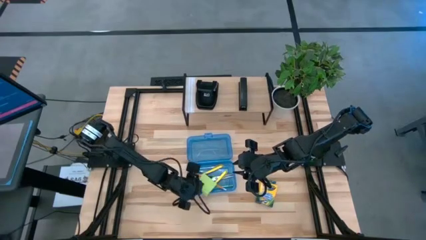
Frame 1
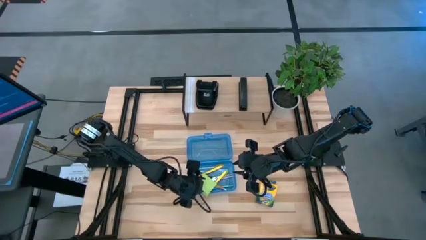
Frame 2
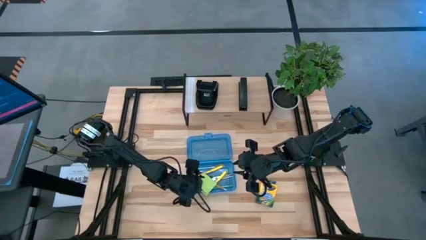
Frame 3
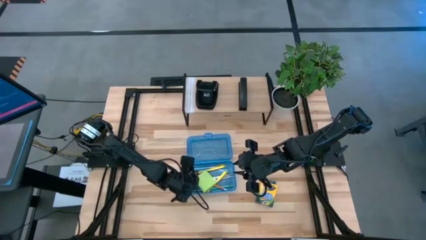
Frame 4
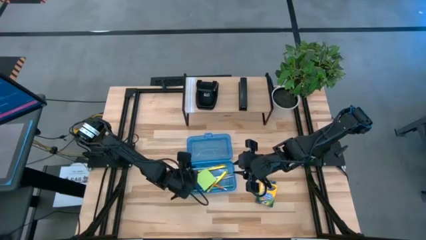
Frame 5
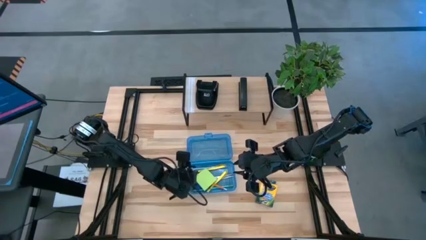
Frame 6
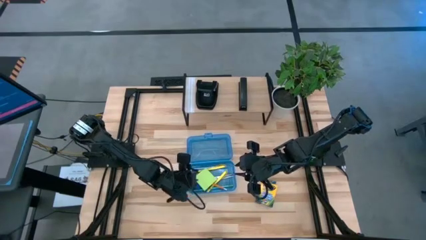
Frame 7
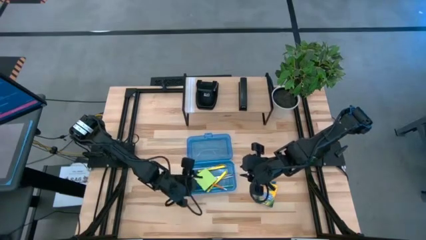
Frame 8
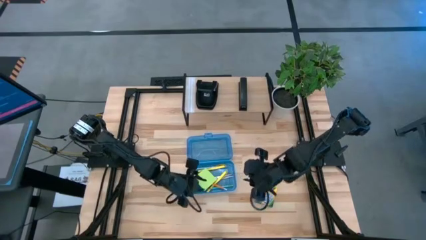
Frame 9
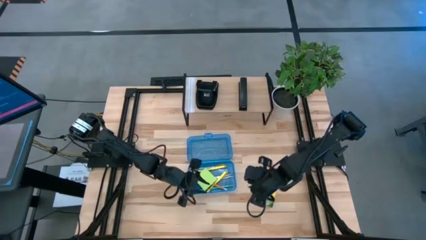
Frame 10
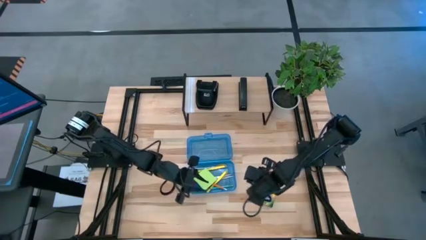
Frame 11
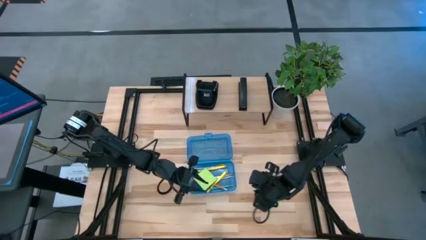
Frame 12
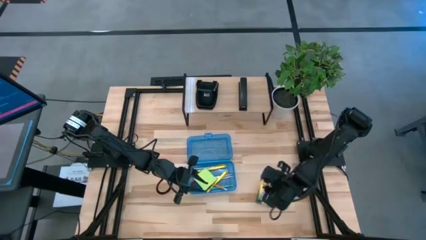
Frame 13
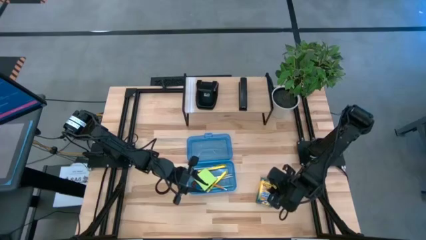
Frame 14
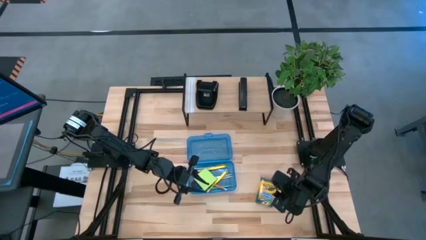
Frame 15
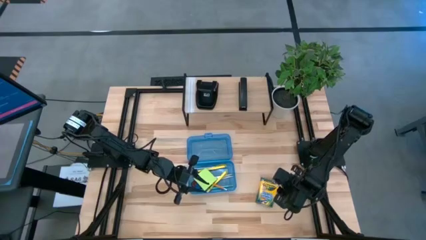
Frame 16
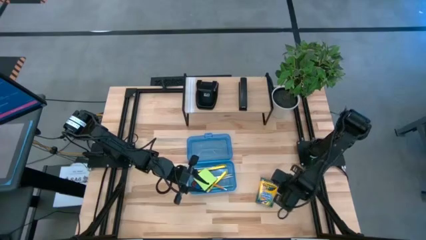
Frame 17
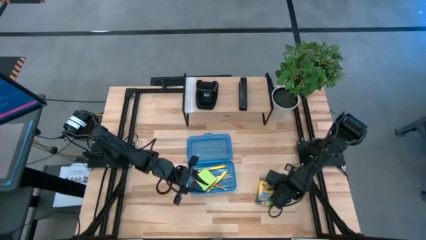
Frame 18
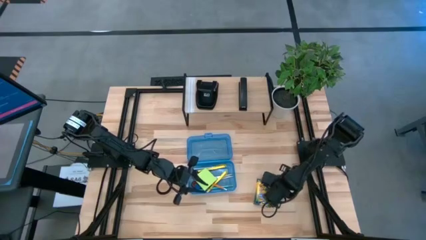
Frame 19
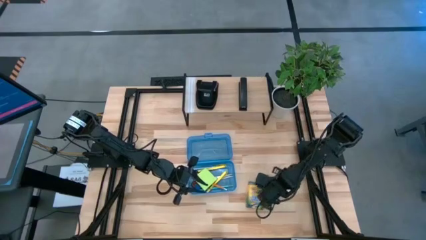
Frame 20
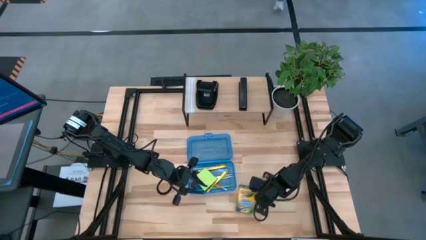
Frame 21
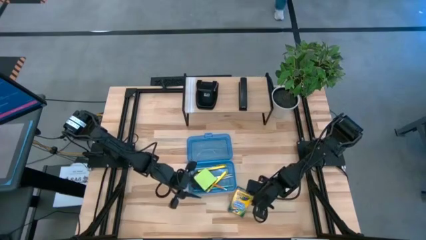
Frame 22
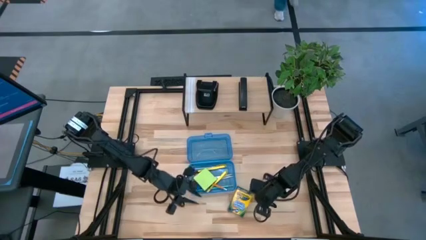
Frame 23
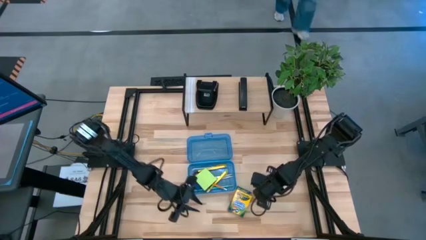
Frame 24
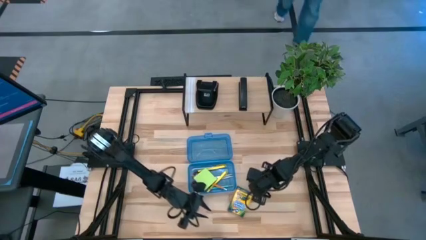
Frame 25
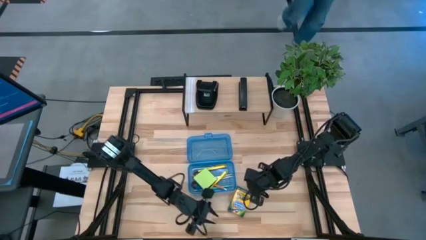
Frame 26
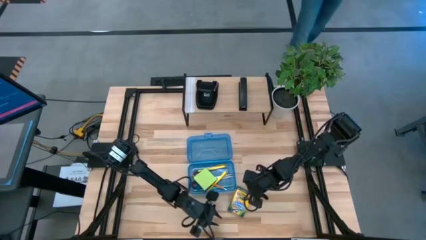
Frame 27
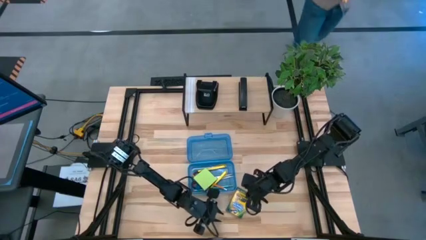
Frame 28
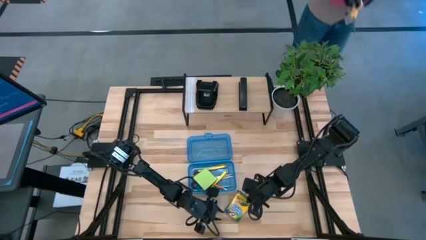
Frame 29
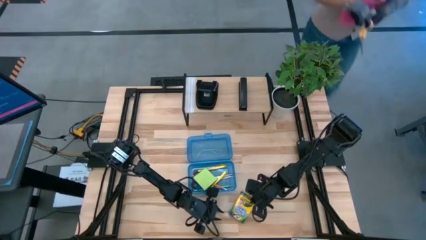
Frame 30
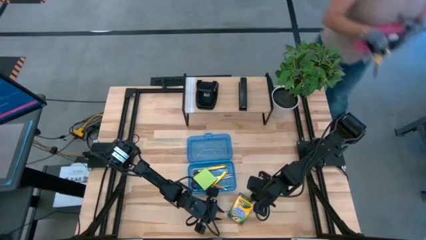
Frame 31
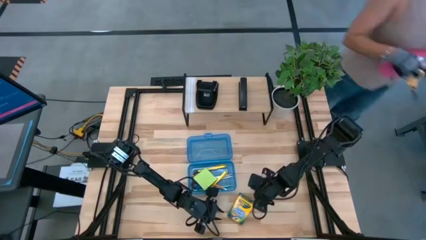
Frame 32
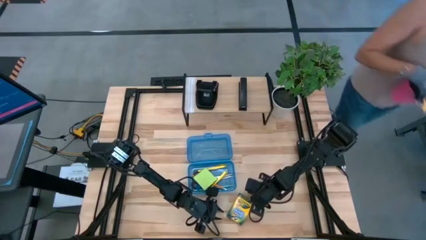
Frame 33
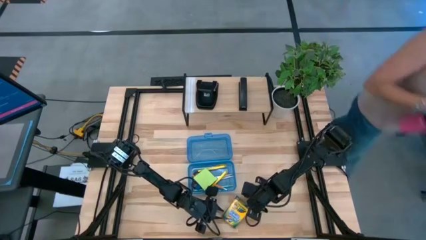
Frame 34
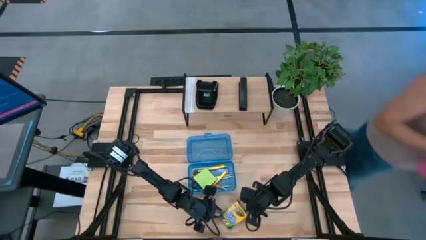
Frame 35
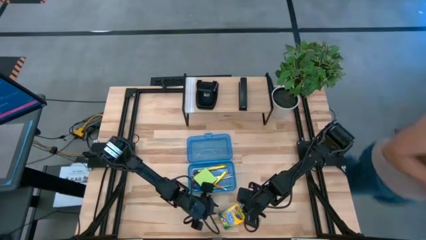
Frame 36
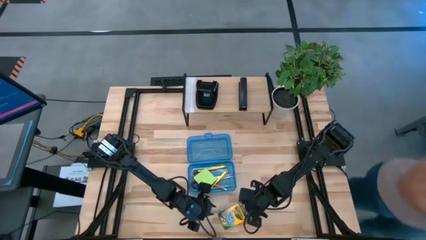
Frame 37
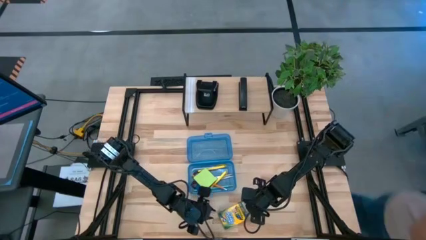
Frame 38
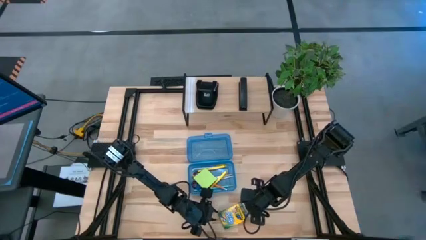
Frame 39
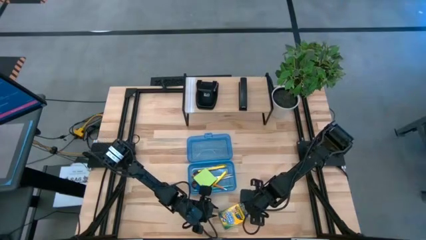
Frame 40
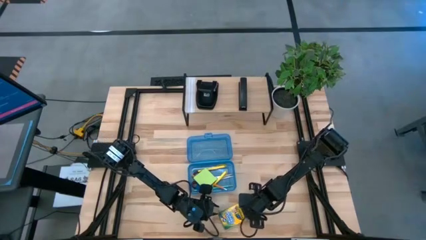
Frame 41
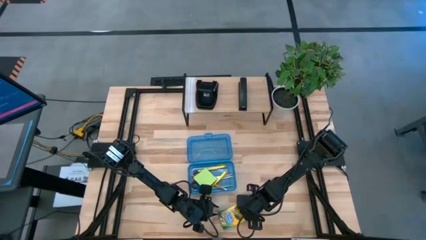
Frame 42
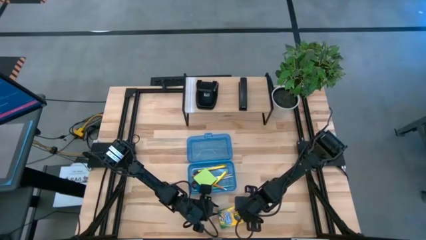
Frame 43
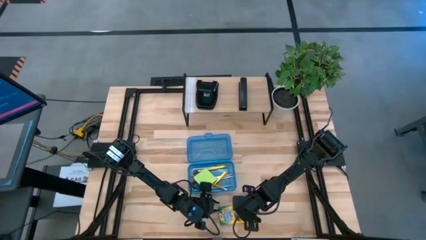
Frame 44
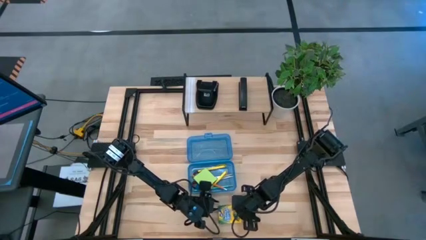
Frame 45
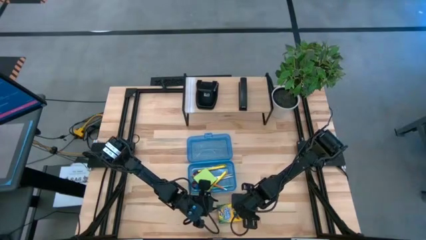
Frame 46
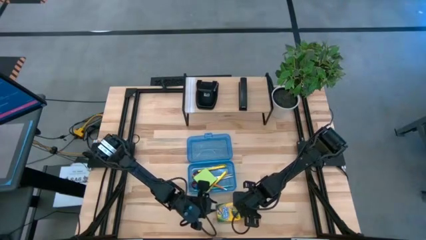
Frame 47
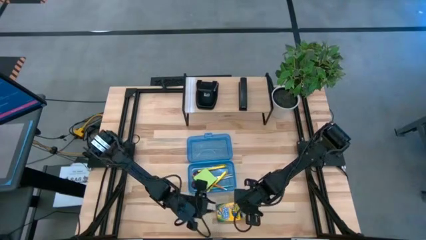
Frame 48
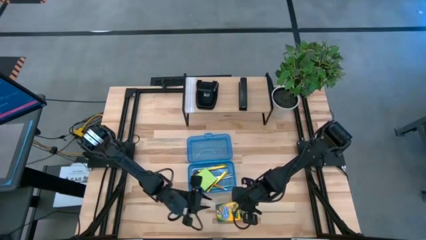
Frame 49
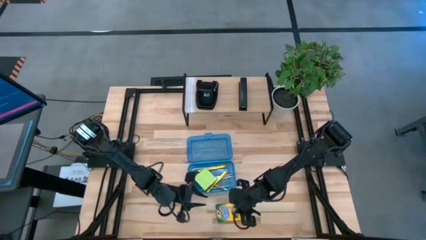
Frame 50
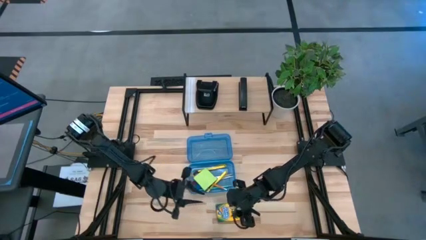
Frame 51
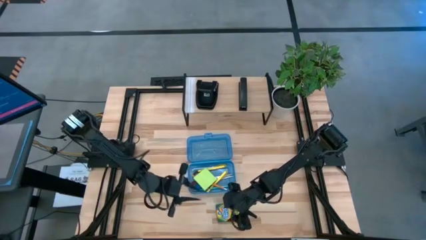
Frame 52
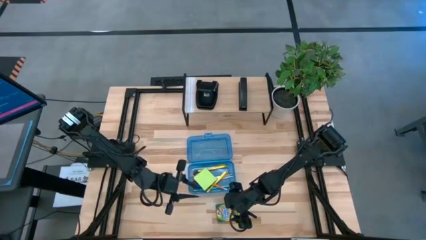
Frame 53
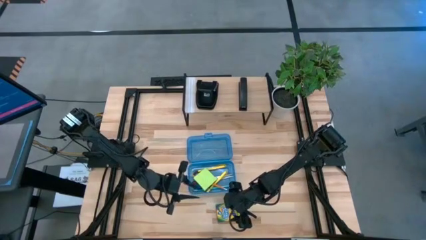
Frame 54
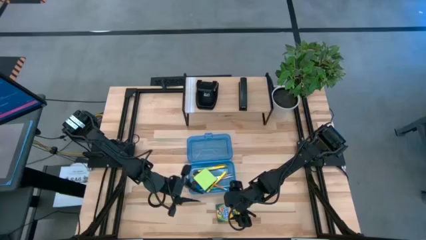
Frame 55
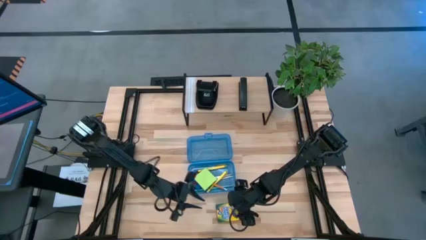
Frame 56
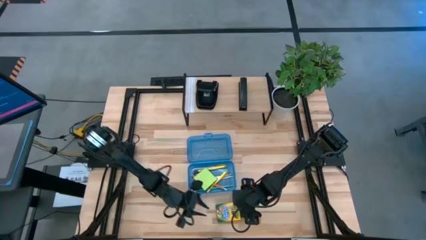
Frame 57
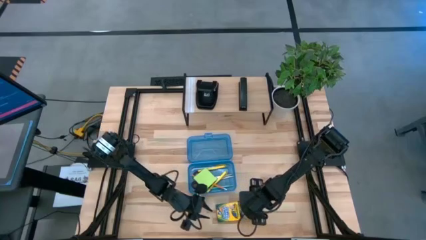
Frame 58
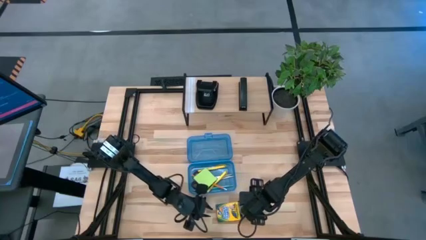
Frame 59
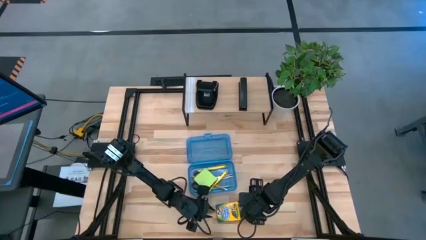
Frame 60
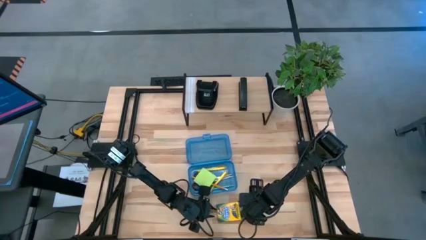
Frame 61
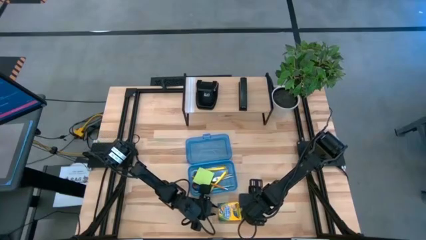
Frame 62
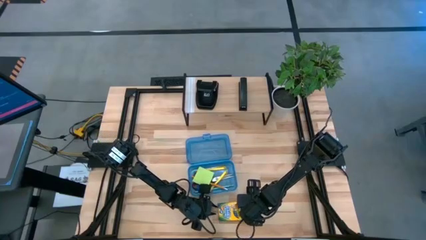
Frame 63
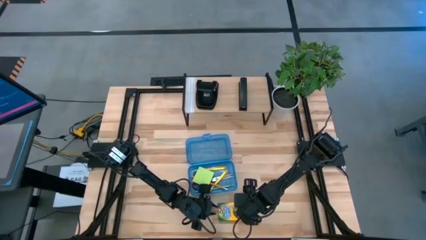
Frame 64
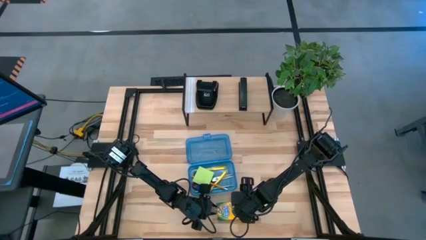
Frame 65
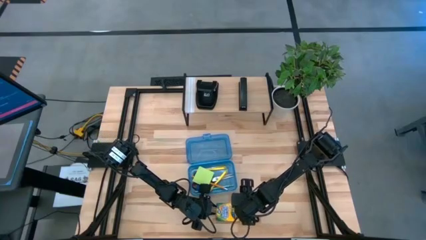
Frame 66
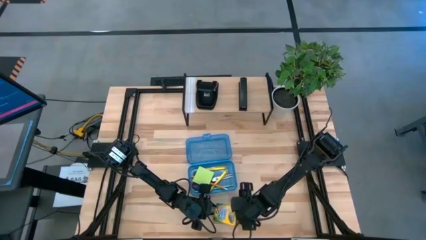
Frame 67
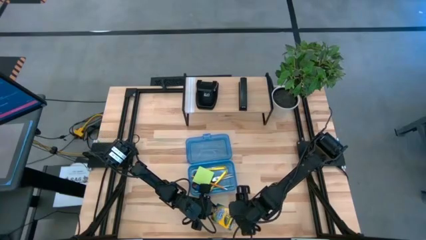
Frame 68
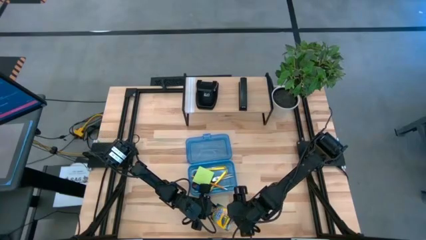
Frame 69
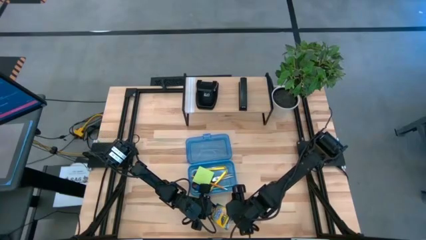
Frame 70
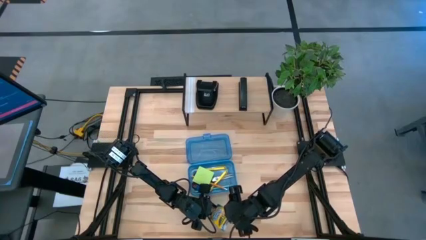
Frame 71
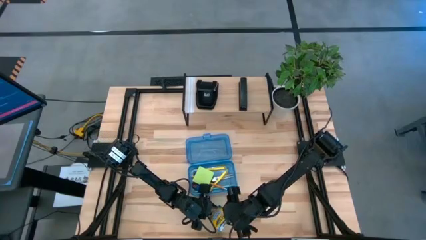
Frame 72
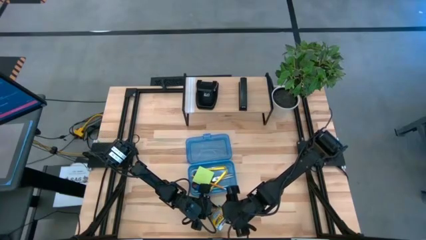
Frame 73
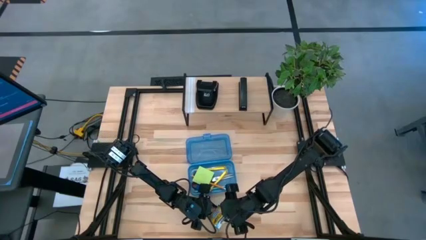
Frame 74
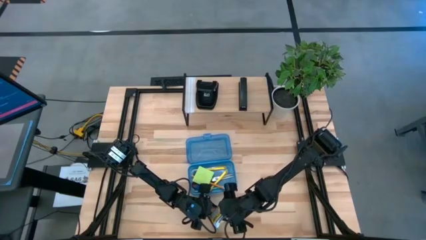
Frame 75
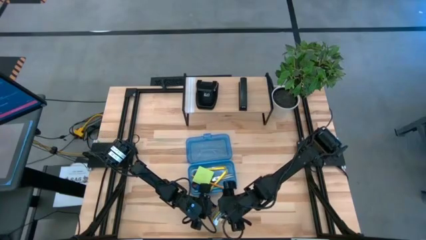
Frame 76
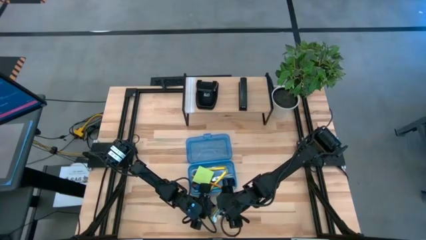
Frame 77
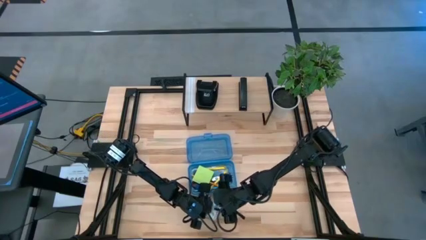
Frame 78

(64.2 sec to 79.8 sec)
Task: Pack school essentials
Put the crayon box into the supply box

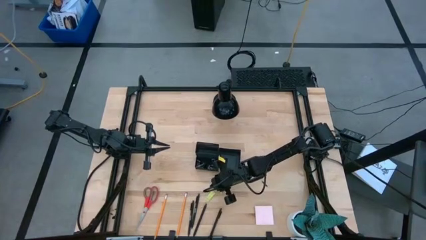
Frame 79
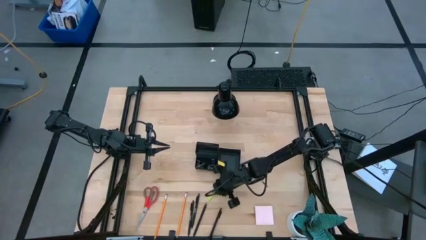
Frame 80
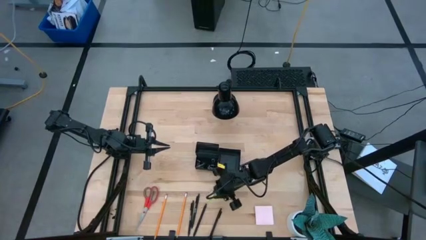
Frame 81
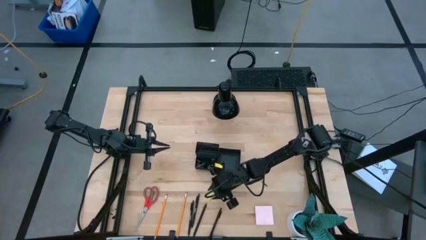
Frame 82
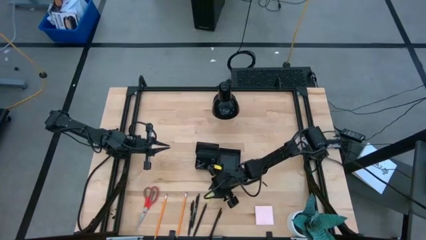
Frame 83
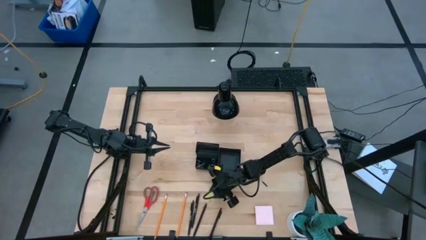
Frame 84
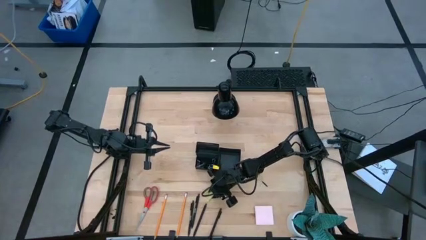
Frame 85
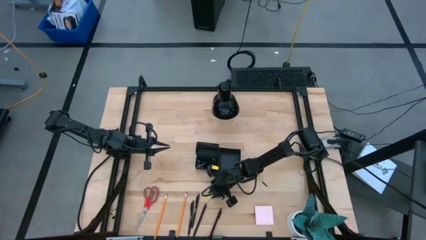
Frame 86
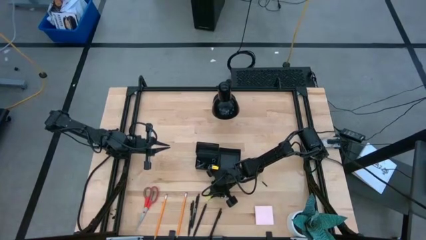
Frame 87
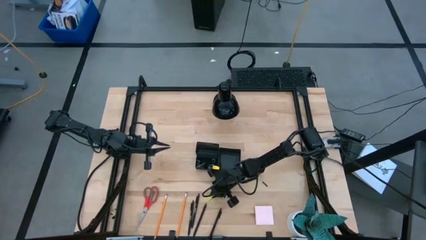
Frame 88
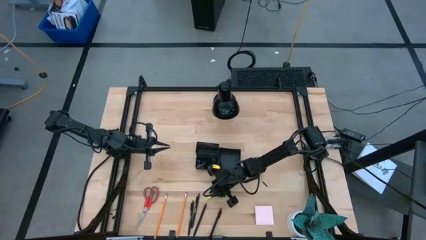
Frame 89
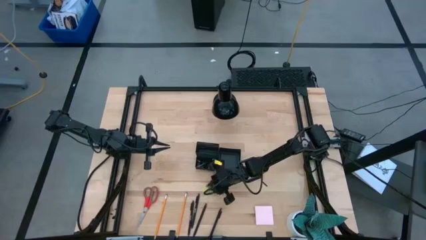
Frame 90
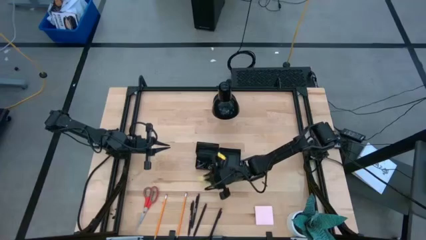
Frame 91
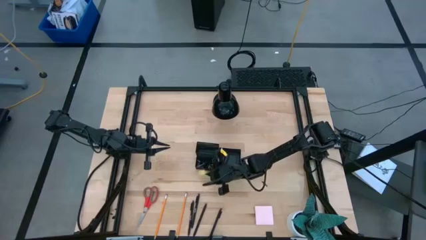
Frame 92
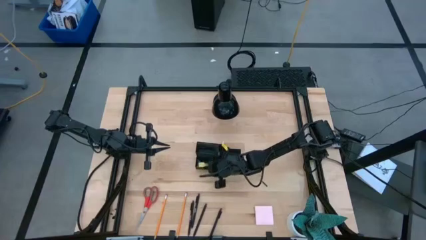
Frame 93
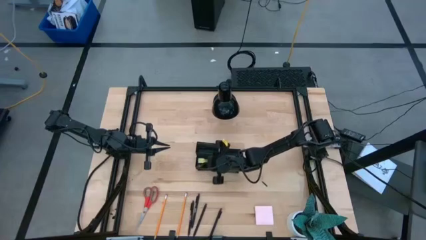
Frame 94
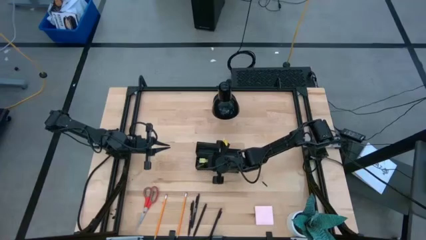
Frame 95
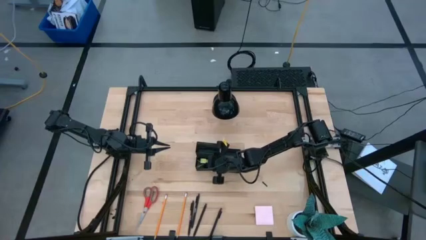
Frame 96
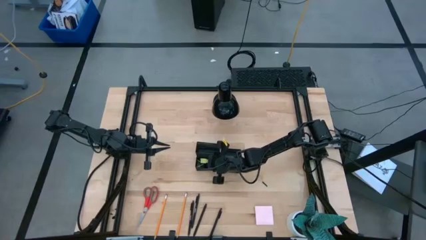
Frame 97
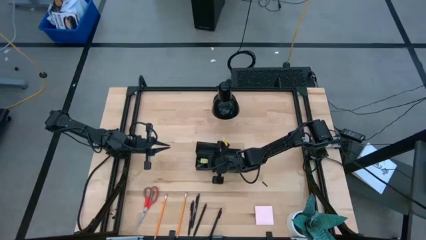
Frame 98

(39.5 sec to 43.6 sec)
Task: Pick and place office supplies into organizer
Put the eraser into the bottom left section of the desk organizer
